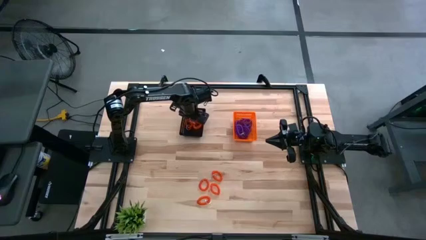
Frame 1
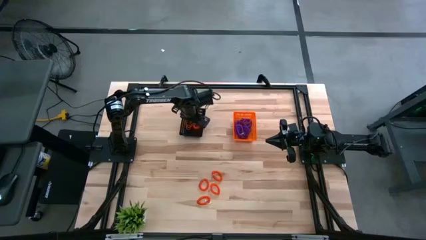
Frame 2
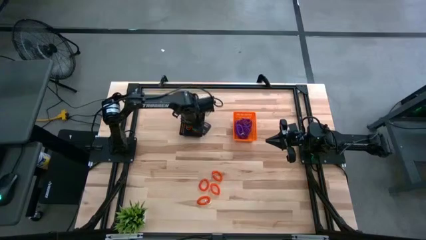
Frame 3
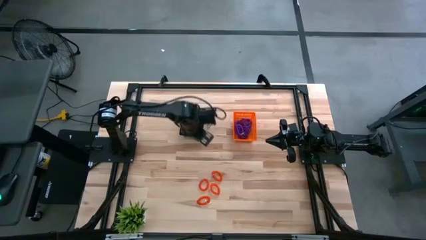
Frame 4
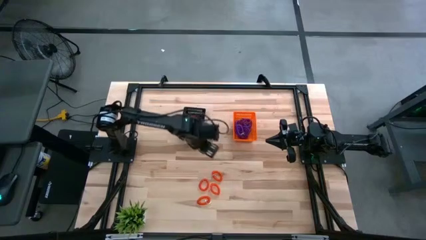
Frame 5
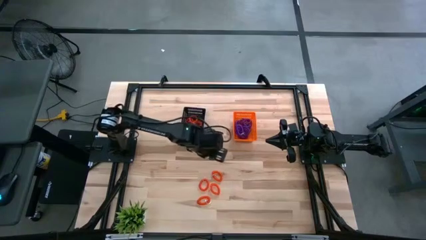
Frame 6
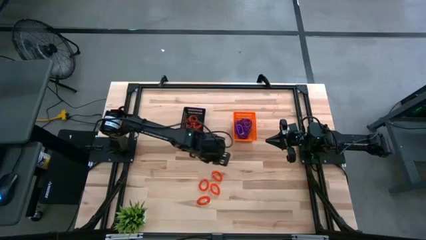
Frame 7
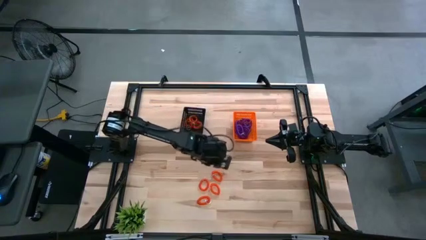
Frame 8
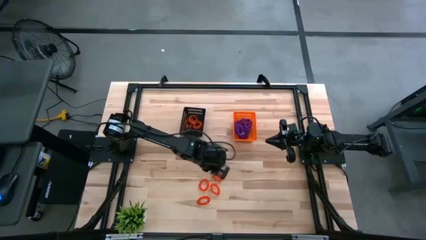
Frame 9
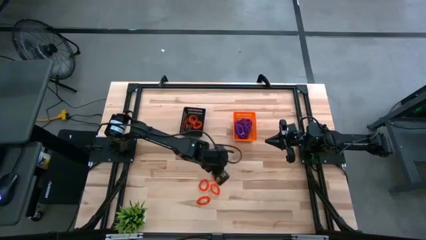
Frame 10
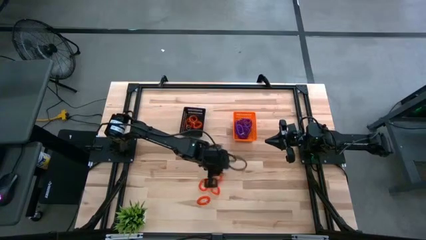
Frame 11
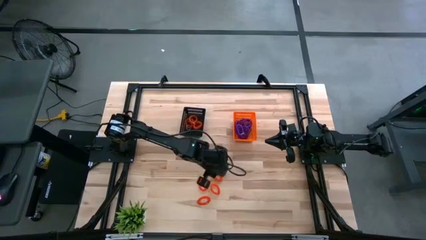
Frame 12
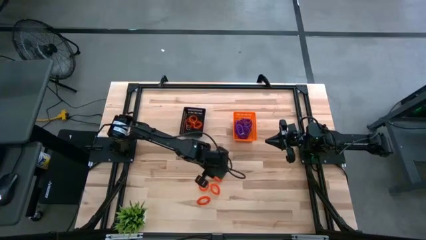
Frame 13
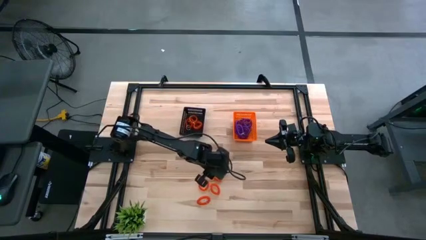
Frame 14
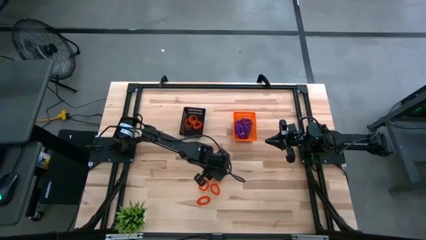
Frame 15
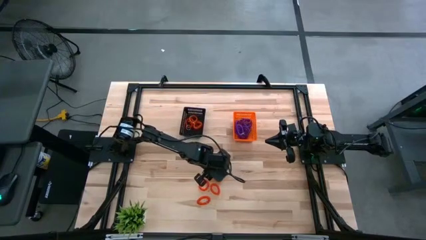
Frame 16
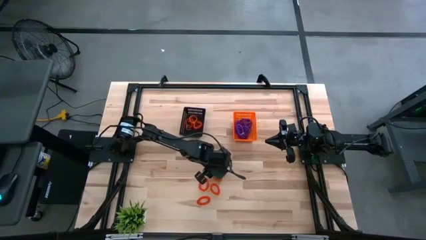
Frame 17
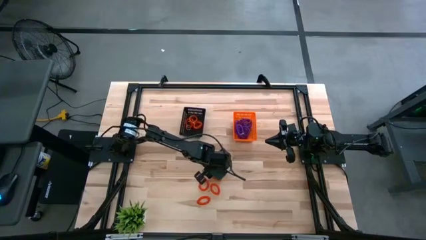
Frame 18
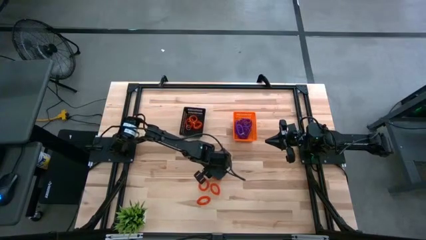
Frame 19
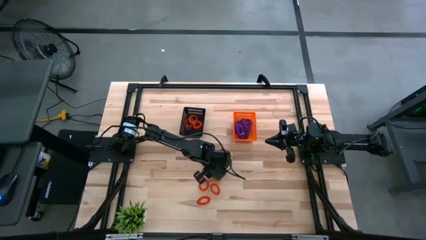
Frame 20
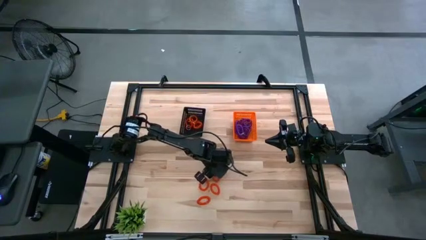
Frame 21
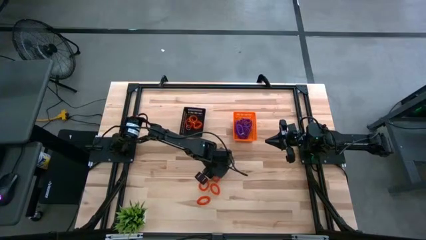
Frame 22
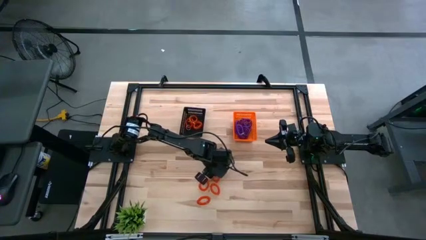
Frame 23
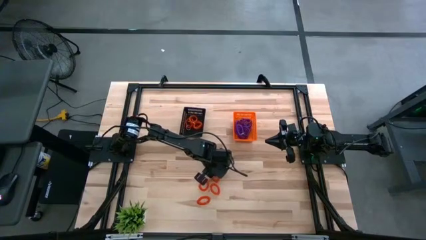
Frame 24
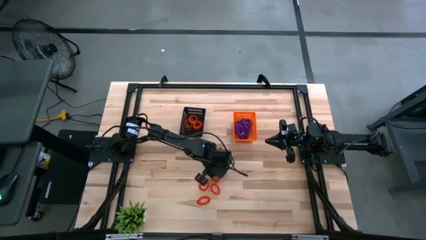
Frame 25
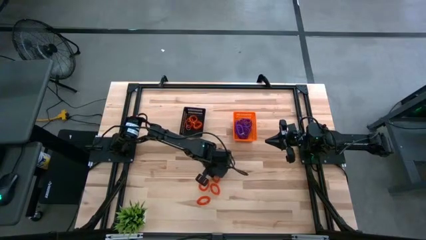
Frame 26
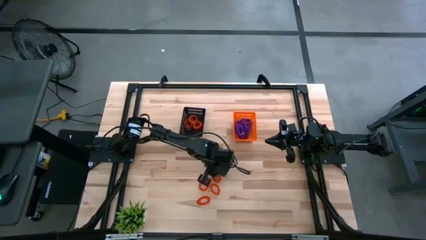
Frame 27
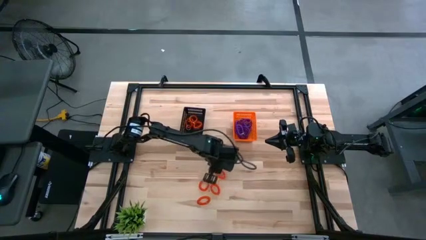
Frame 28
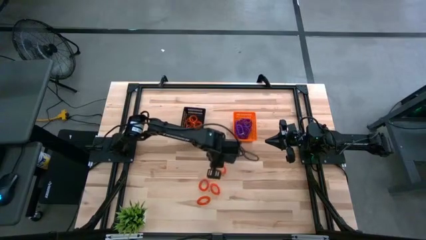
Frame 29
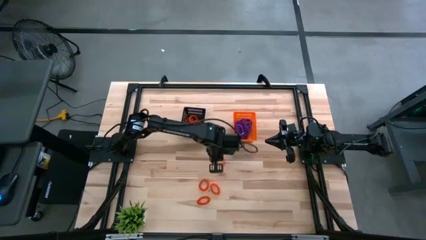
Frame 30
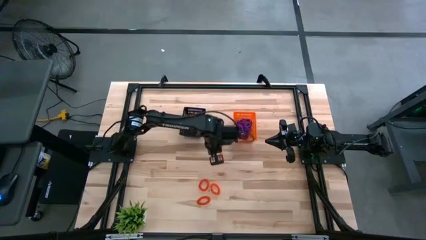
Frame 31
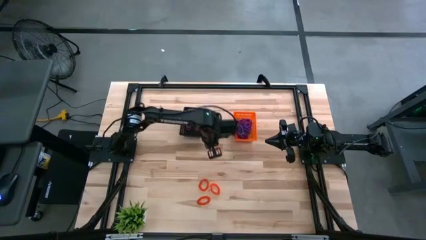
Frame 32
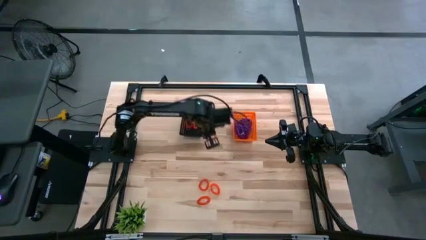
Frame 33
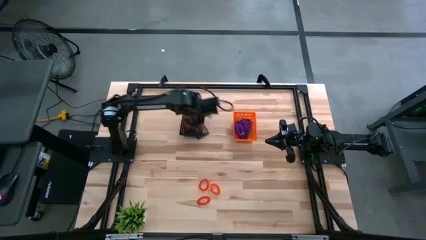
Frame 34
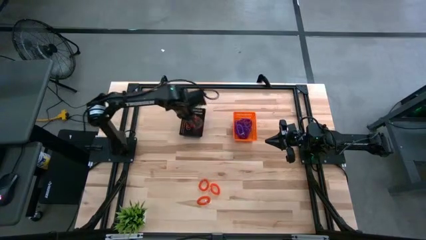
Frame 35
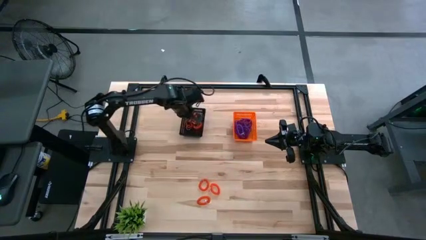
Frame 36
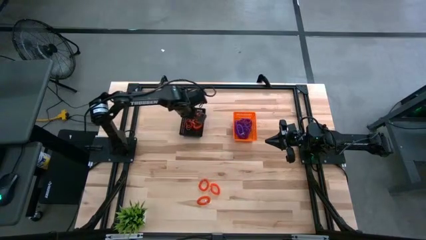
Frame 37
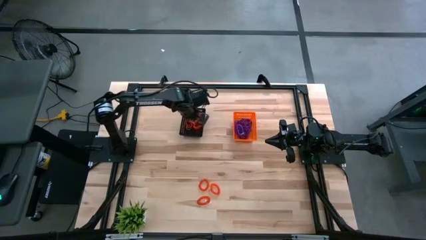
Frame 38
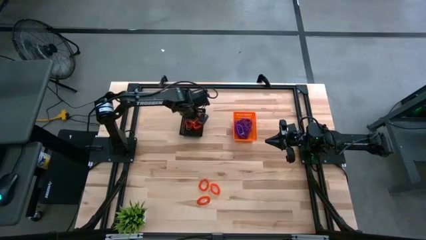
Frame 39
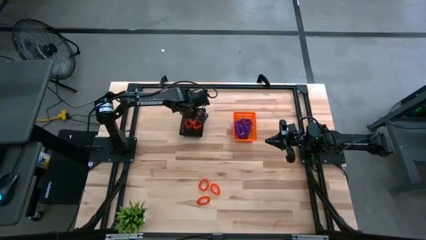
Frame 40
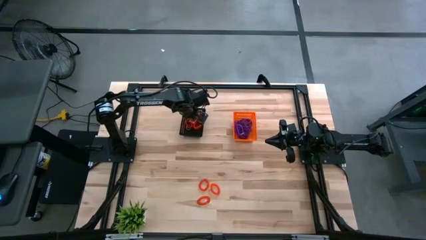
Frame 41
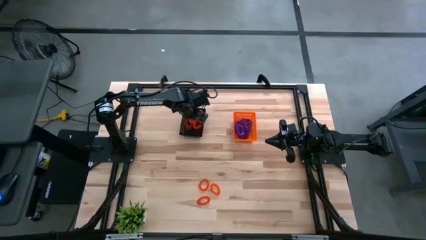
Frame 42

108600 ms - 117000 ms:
Task: Sort spring keychains into baskets
Put the orange spring keychain into the black basket

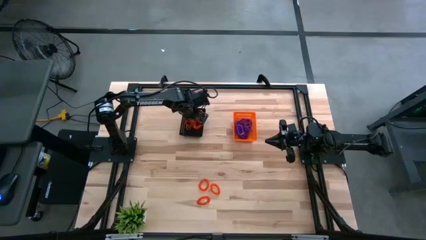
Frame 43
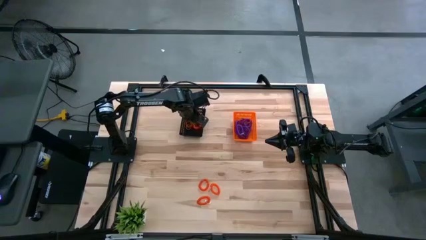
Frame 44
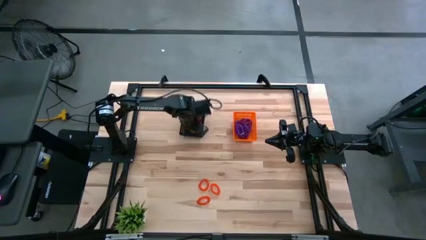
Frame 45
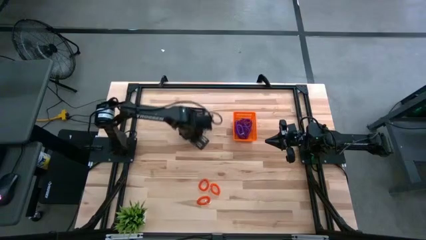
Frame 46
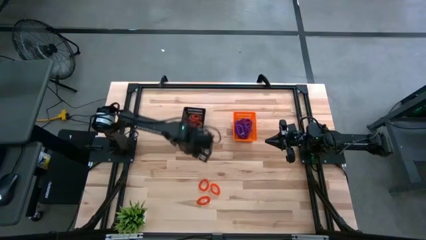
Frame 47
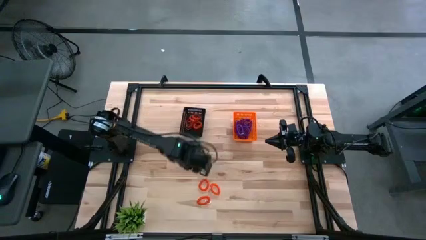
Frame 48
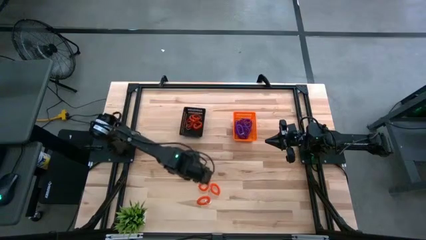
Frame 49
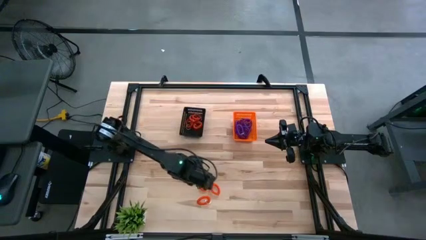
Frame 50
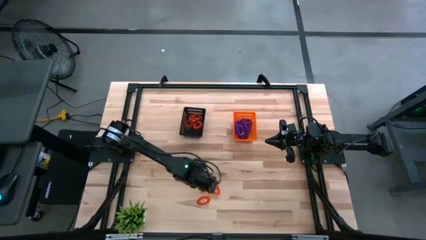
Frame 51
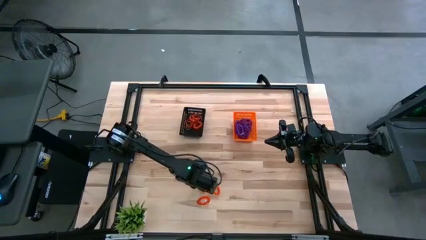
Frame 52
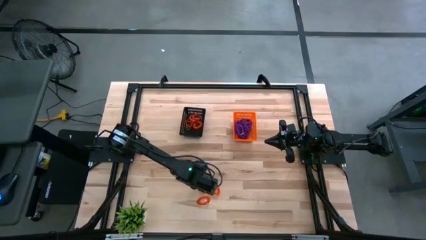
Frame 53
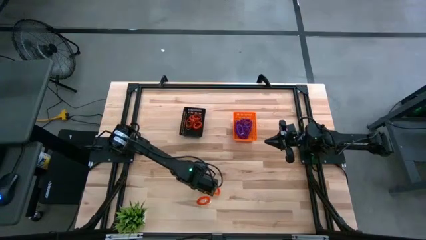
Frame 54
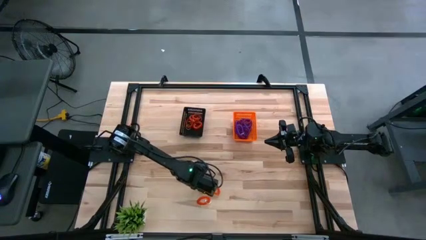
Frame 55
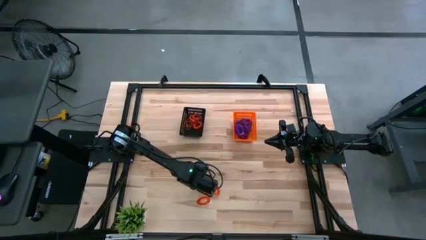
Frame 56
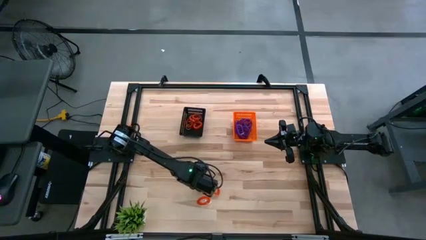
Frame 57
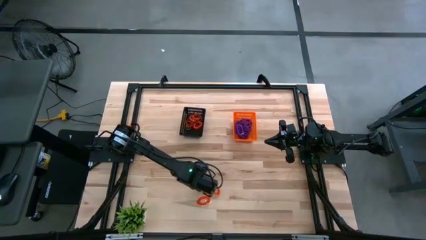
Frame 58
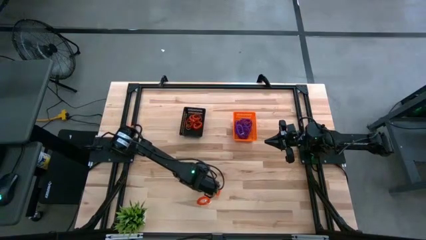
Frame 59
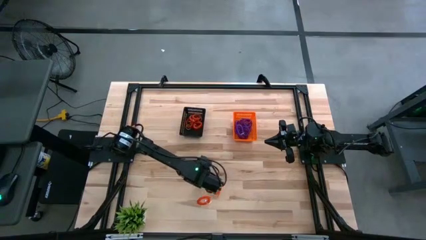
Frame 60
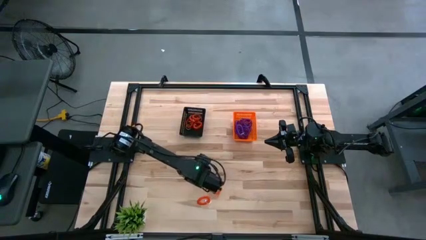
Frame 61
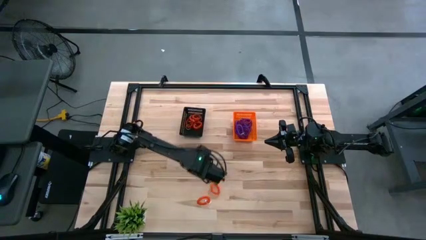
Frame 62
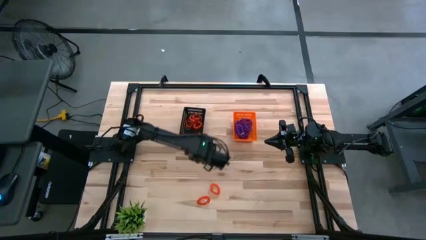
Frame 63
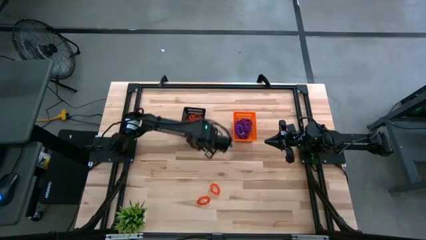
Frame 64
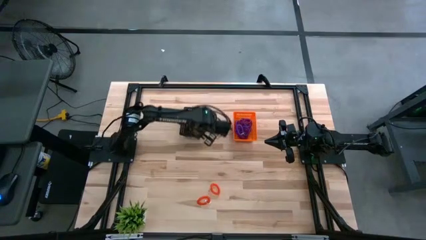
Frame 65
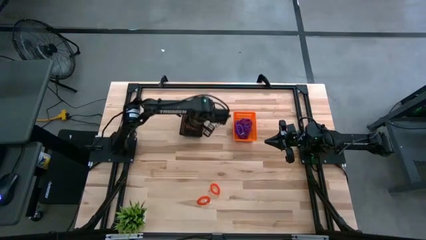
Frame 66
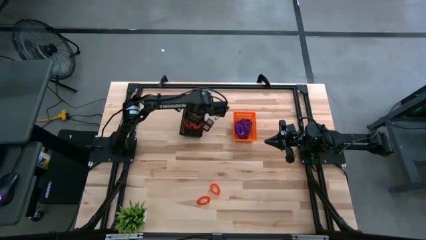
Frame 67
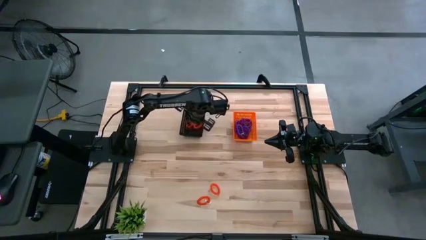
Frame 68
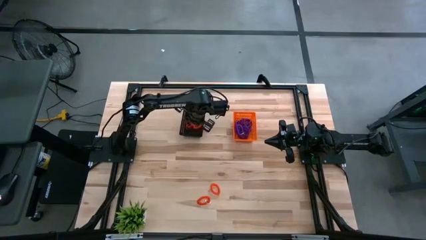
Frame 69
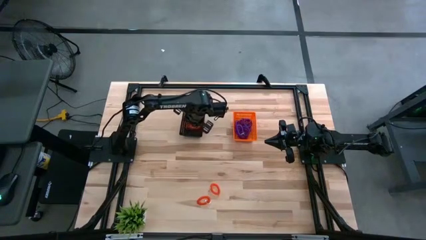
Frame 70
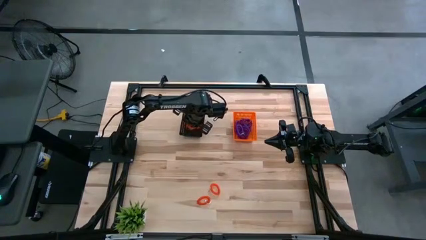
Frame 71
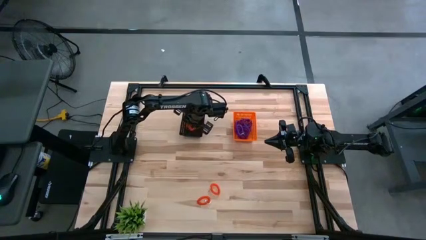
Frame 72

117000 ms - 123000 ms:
Put the orange spring keychain into the black basket

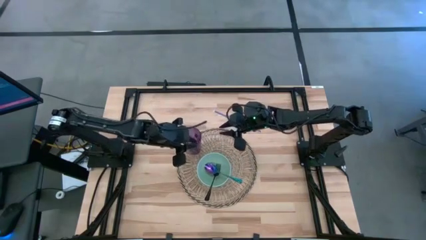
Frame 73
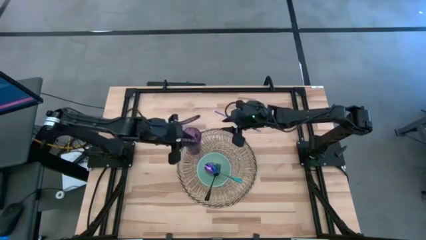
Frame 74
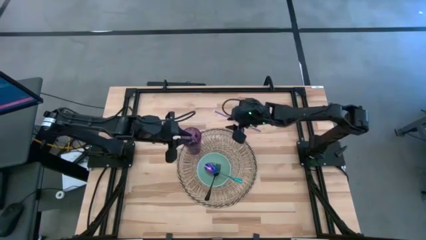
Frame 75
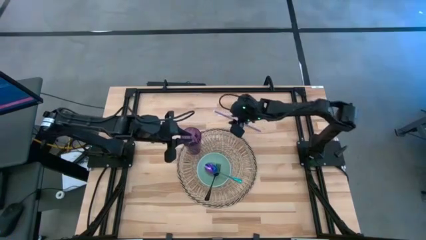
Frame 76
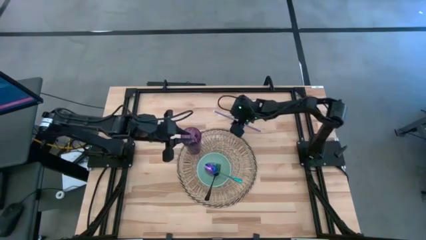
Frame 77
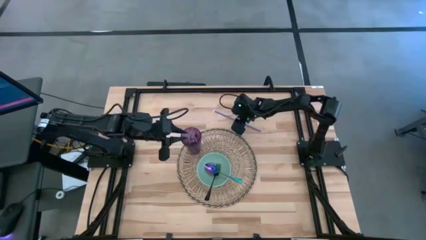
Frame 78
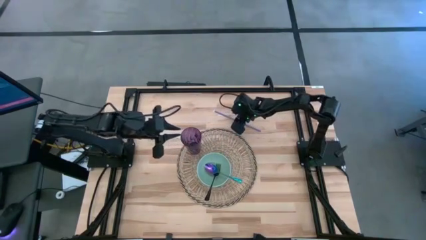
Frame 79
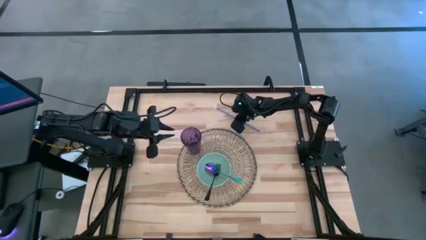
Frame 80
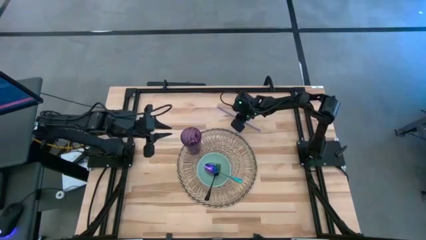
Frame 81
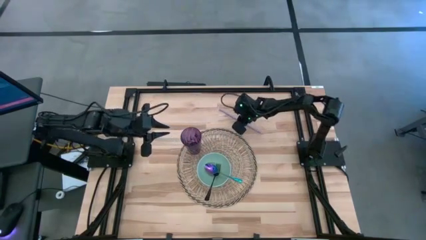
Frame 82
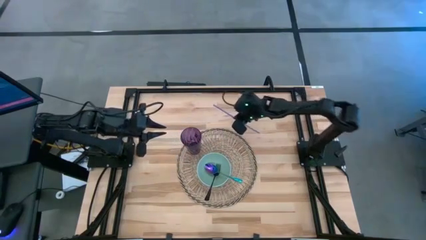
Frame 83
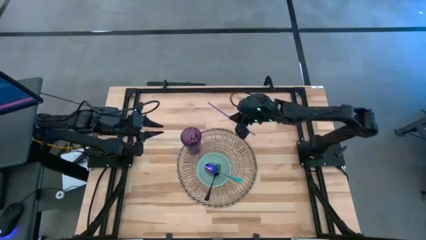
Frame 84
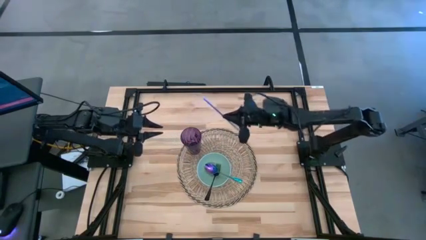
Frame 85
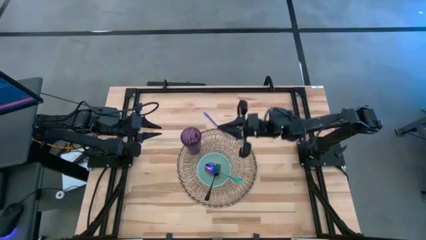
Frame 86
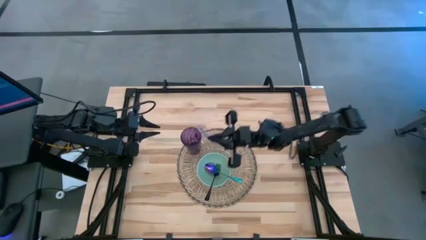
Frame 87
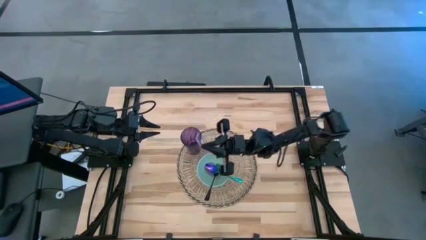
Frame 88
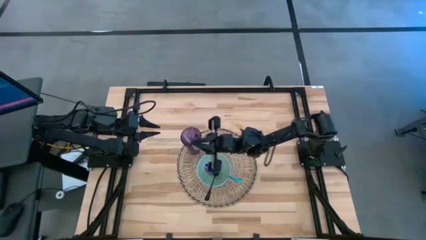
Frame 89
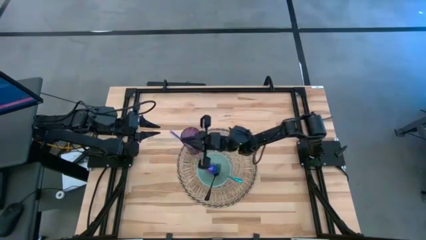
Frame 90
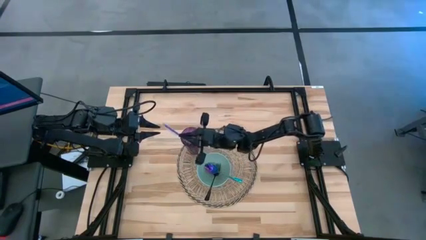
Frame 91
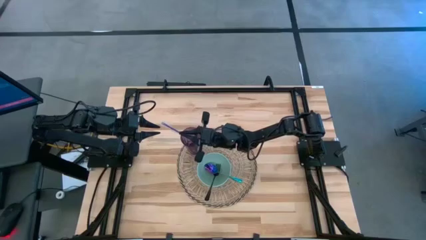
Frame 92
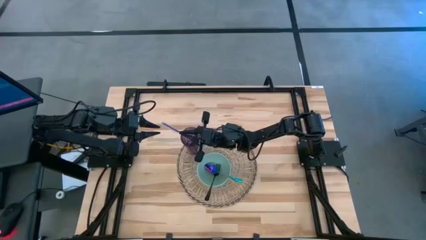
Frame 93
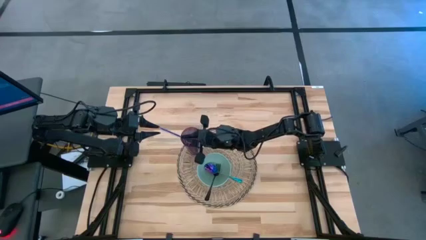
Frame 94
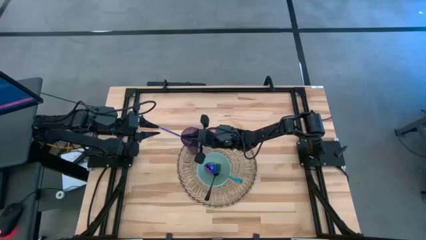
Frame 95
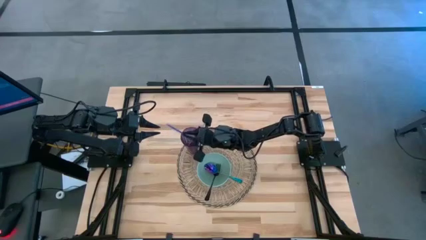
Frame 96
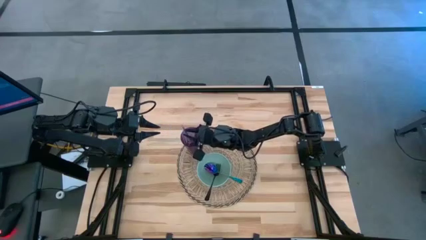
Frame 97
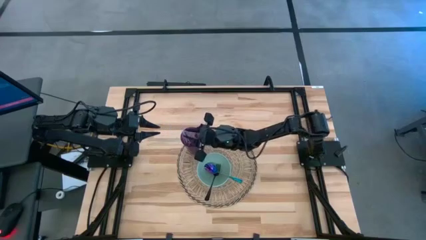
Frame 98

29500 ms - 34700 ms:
Task: Pick & Place Utensil
Put the violet straw into the cup on the brown mat
